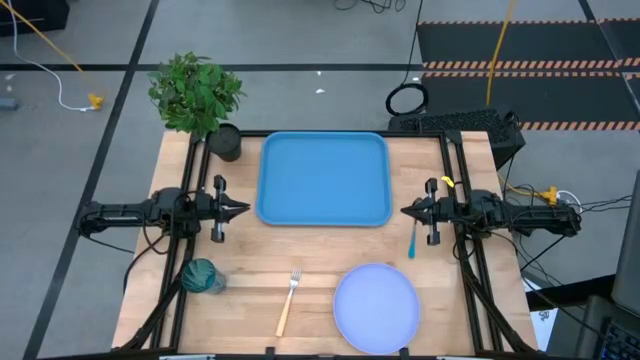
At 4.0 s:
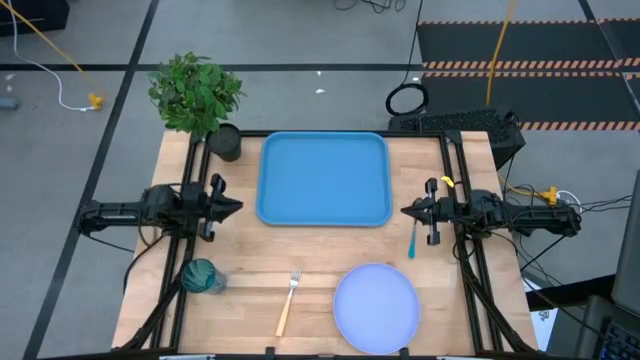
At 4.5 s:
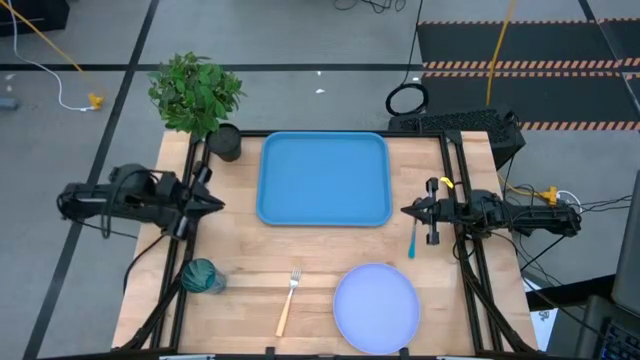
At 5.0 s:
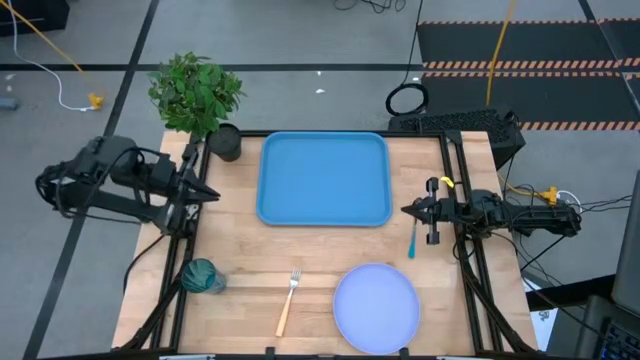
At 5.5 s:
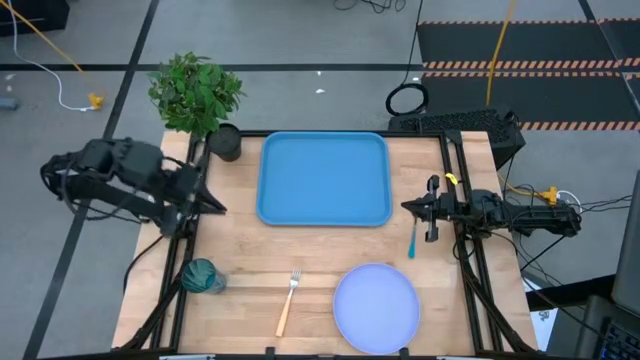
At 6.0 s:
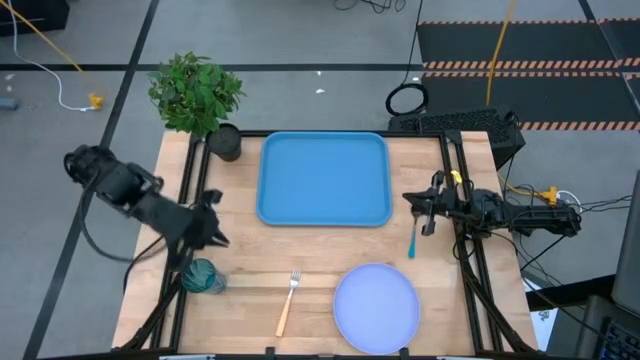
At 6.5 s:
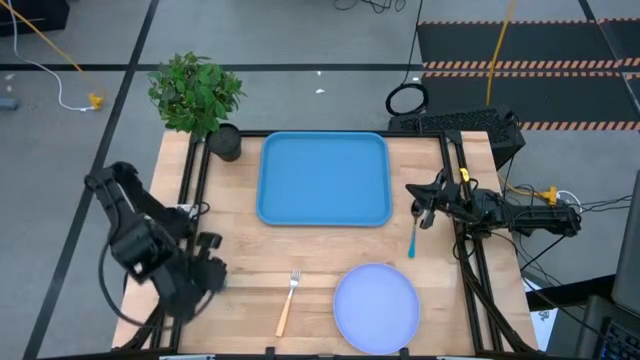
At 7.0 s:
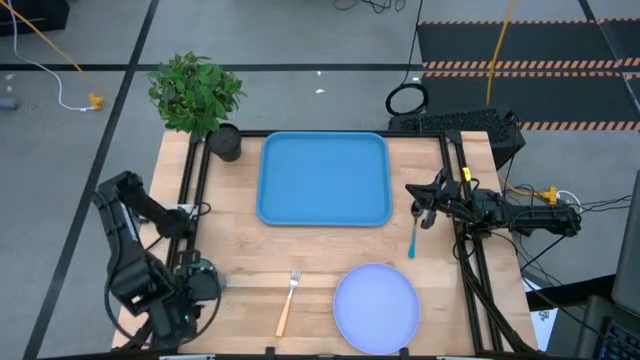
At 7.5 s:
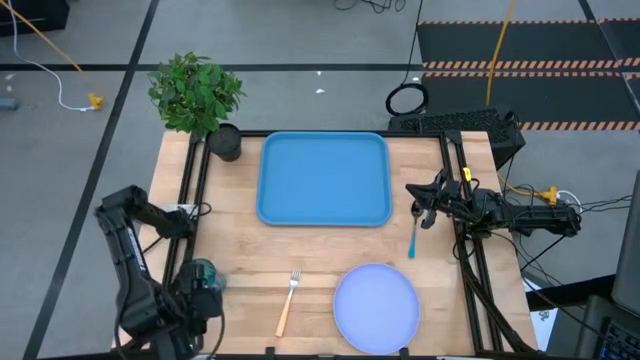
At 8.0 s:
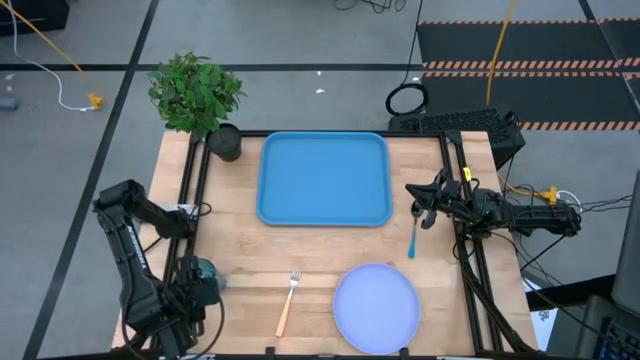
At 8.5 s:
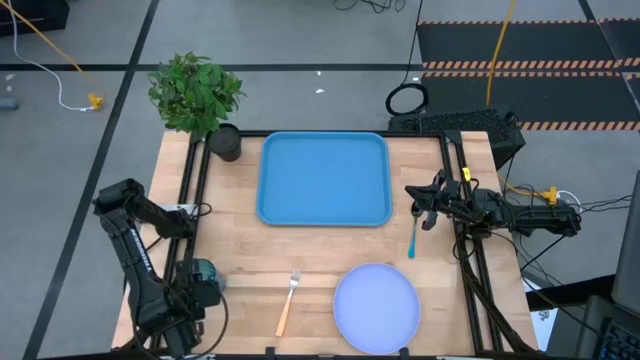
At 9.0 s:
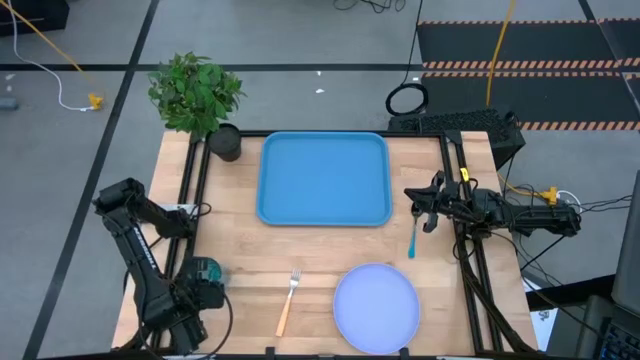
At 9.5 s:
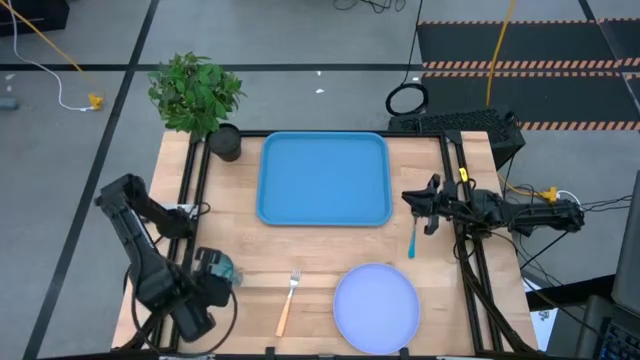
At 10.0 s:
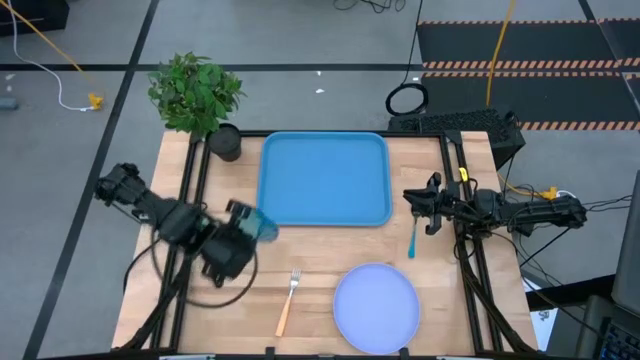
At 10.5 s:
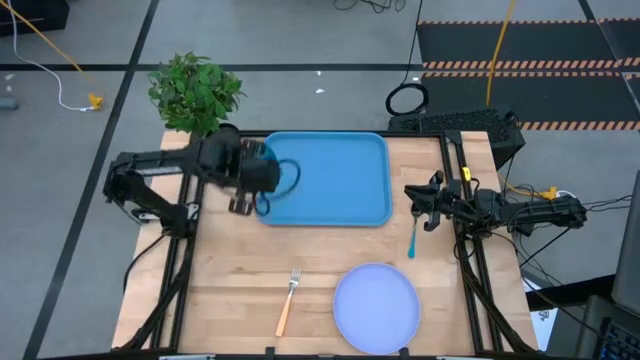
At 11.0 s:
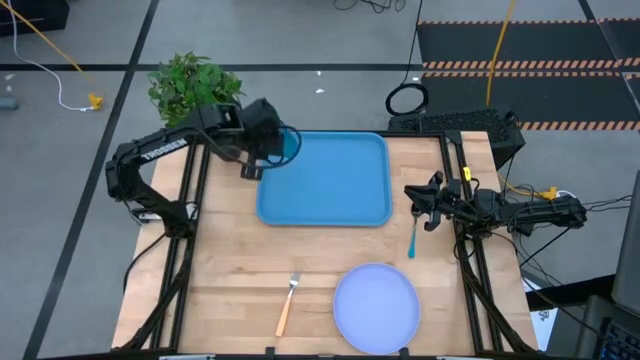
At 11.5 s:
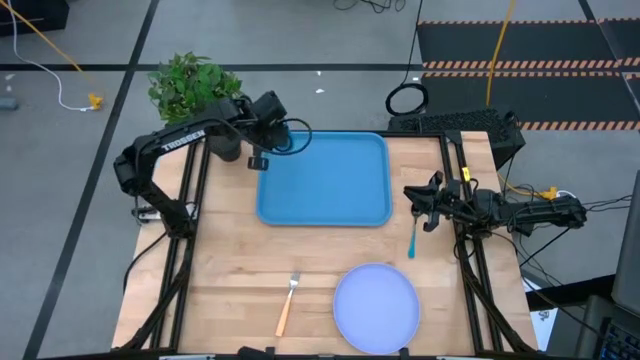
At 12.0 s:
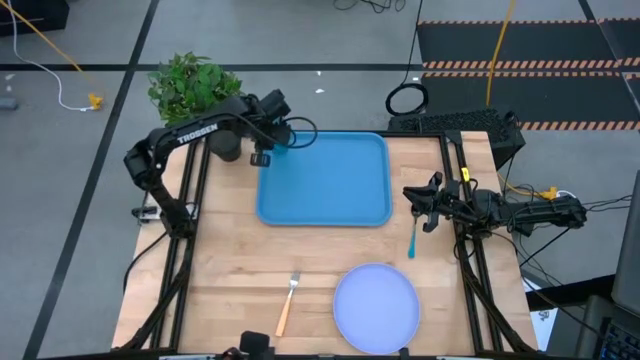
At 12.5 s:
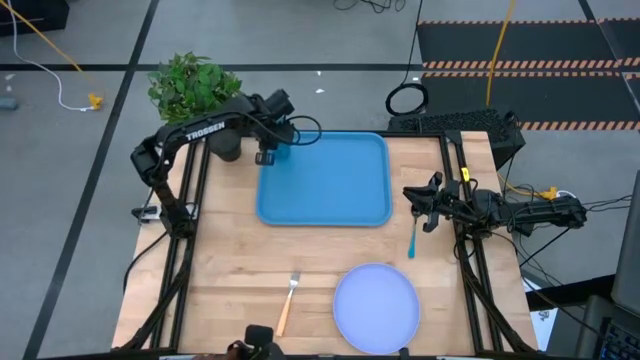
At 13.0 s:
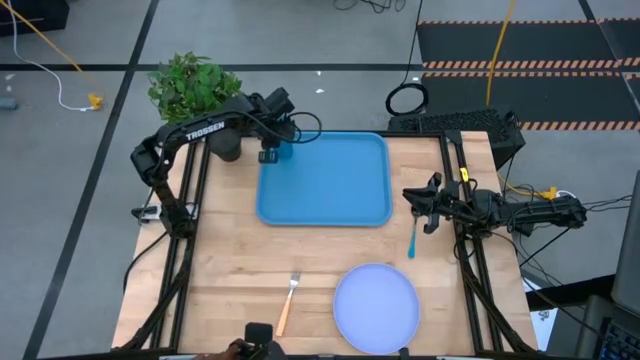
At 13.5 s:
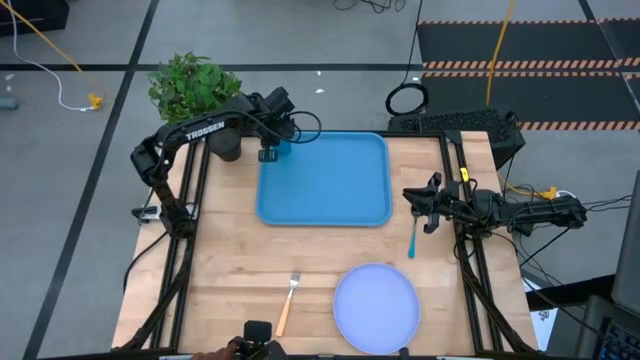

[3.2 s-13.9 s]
Task: Pick and place plate/cup/fork/spoon on tray
Put the blue glass on the blue serving tray

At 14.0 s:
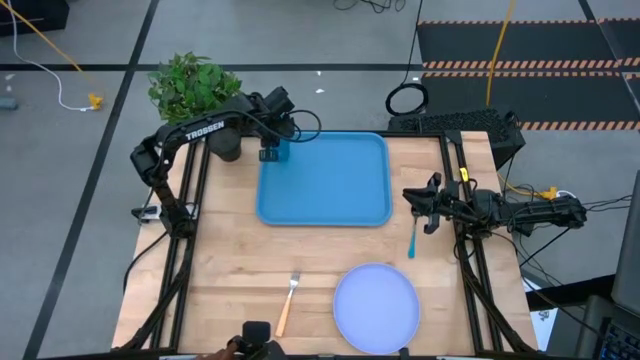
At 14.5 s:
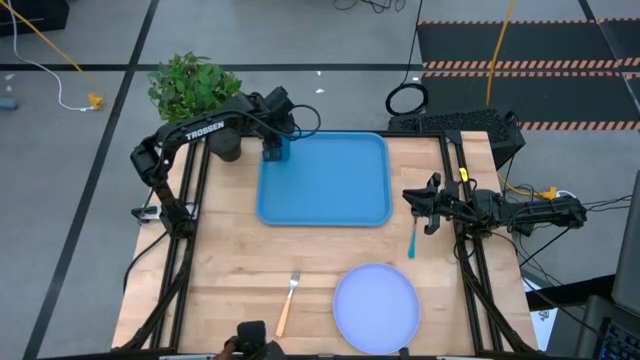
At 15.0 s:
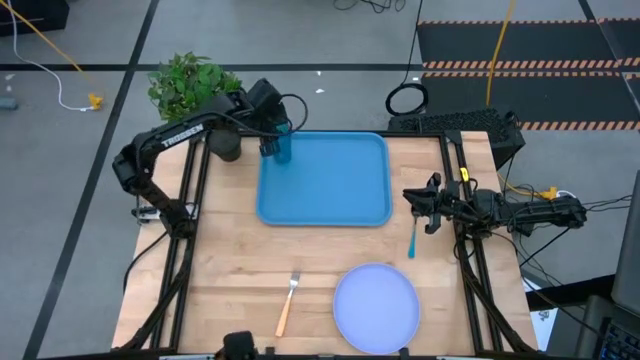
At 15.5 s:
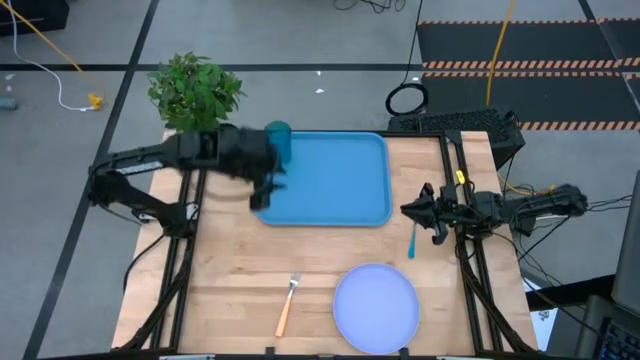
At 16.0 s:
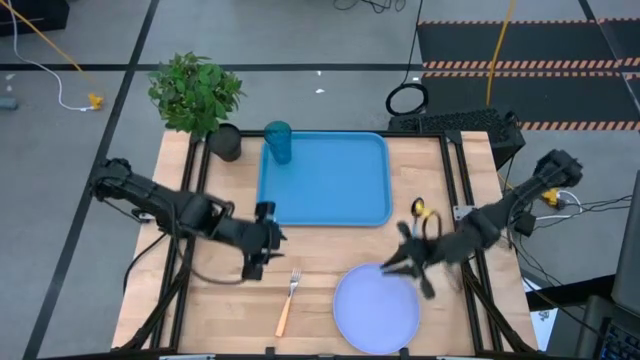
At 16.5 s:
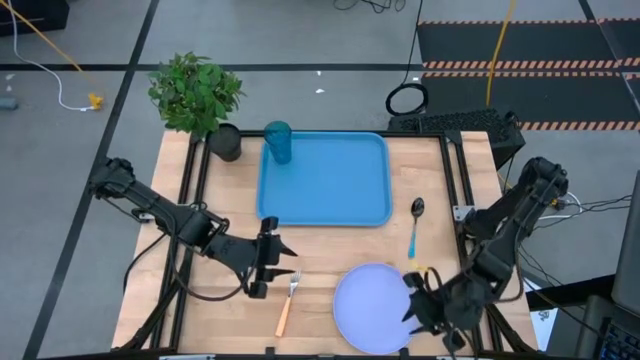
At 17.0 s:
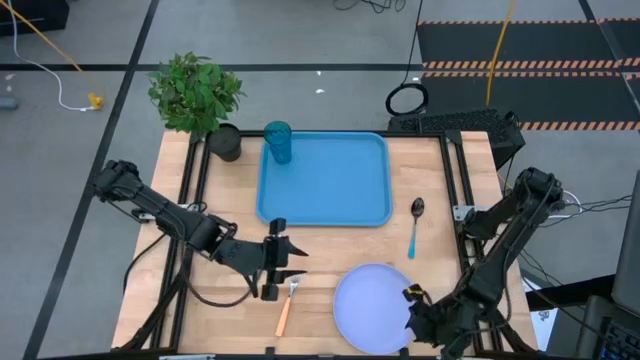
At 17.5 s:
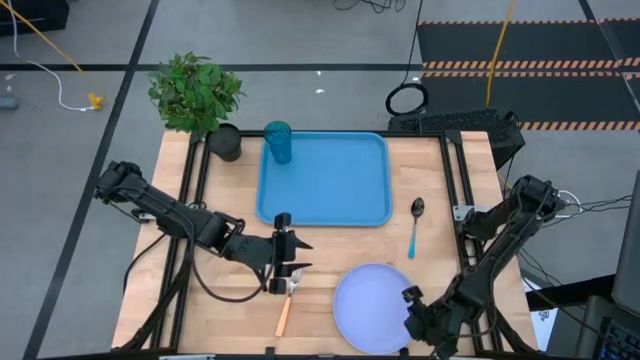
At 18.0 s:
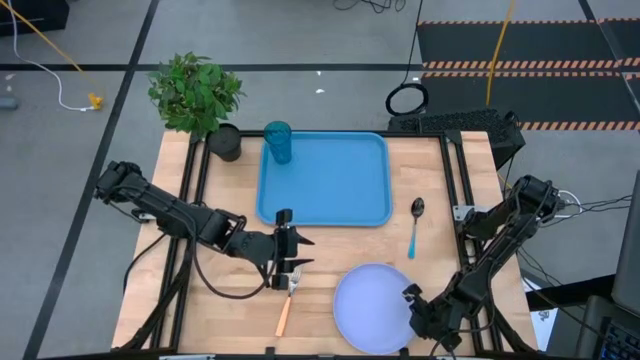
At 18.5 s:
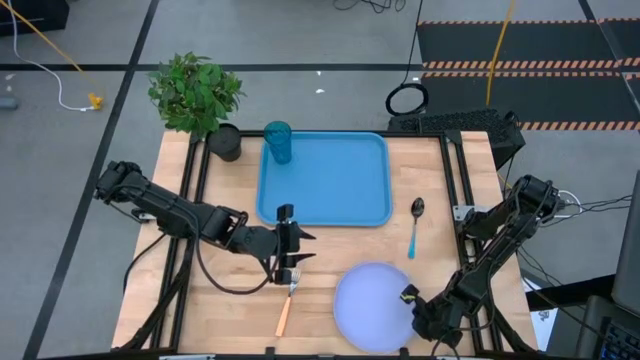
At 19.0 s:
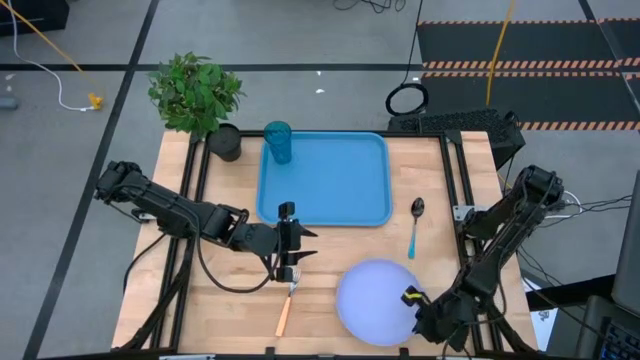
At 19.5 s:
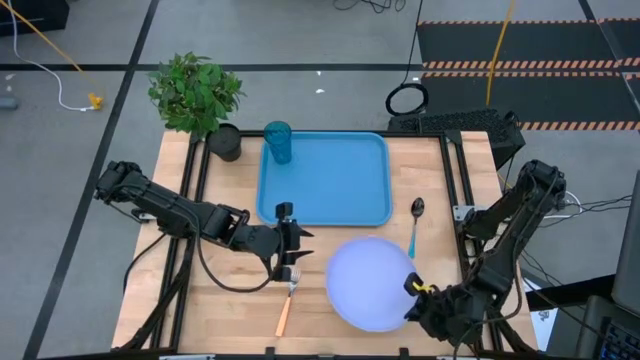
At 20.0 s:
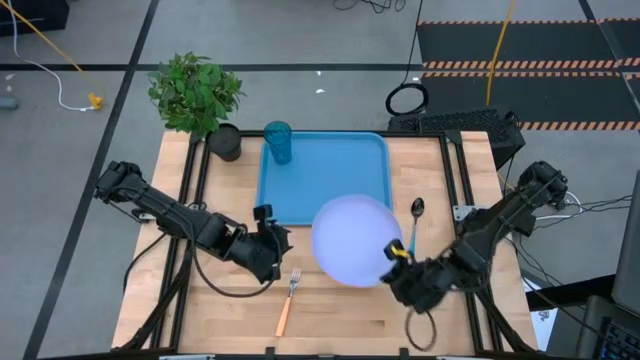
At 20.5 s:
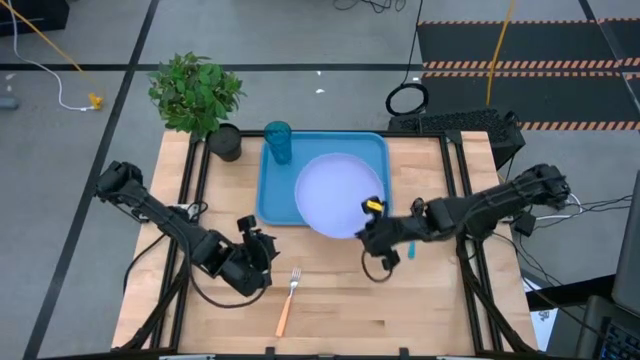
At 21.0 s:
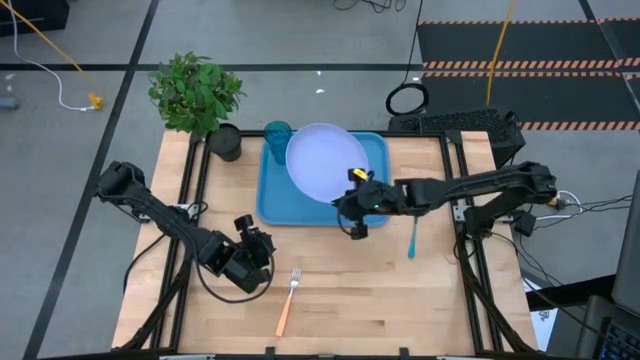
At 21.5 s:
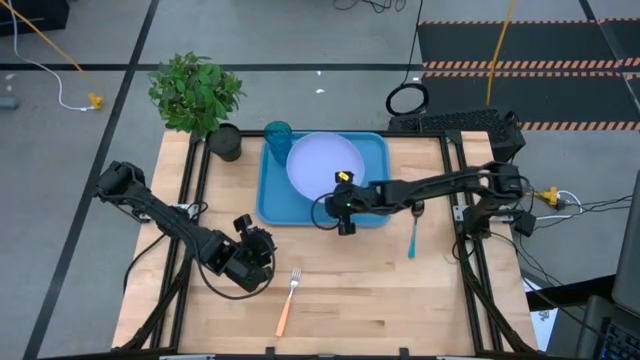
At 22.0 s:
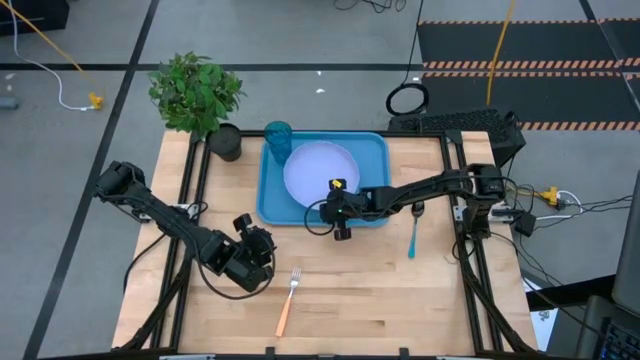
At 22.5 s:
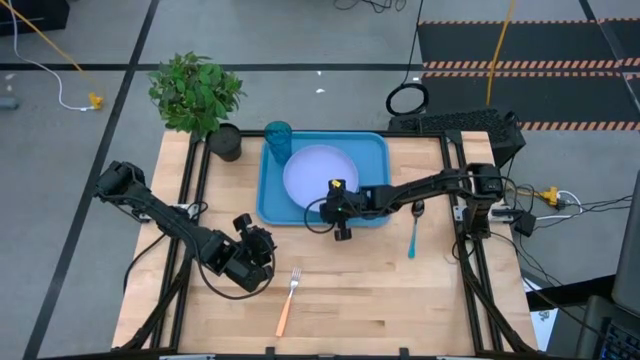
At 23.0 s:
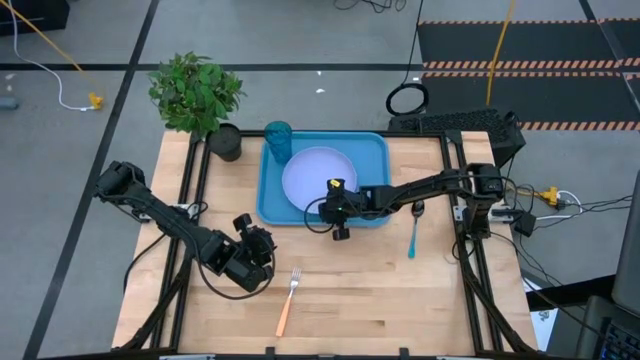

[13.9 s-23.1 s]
Put the light purple plate on the blue serving tray
